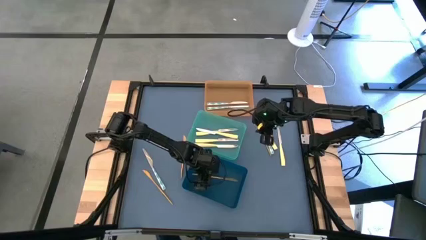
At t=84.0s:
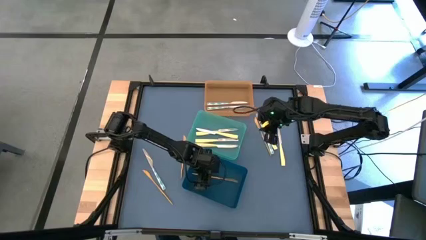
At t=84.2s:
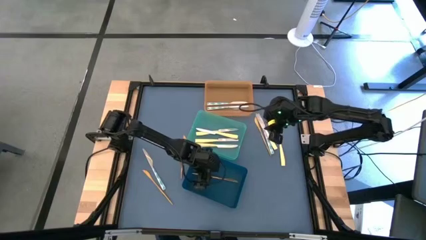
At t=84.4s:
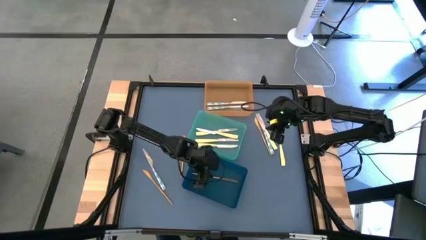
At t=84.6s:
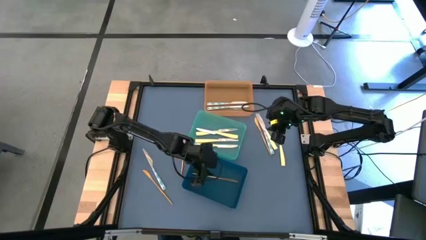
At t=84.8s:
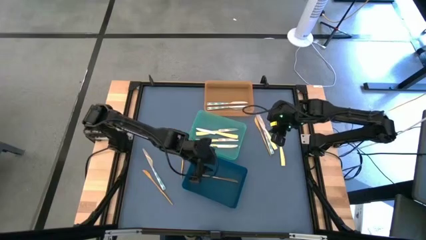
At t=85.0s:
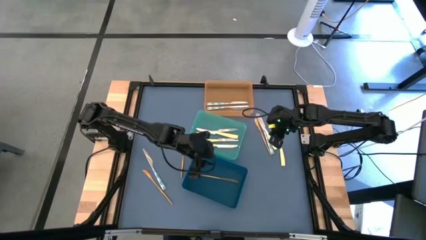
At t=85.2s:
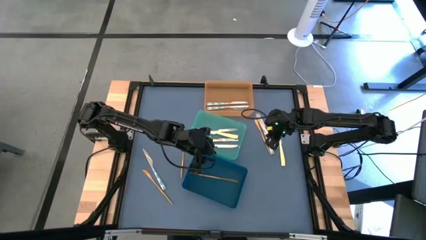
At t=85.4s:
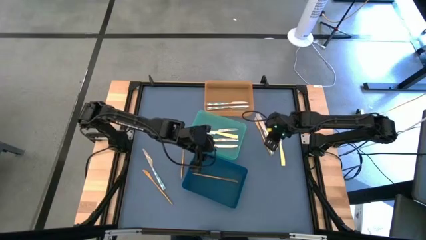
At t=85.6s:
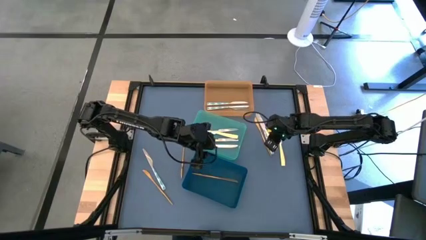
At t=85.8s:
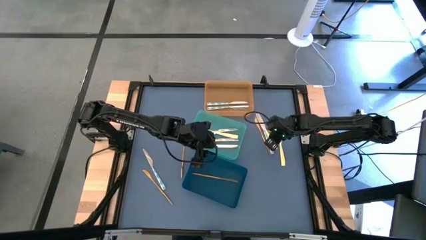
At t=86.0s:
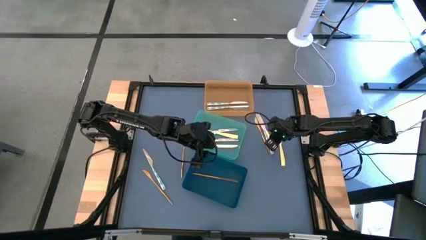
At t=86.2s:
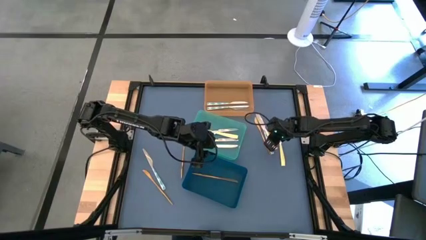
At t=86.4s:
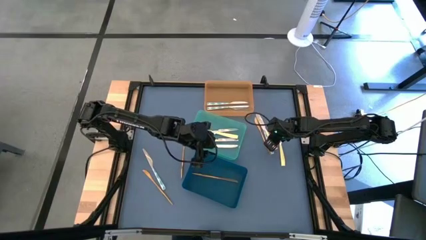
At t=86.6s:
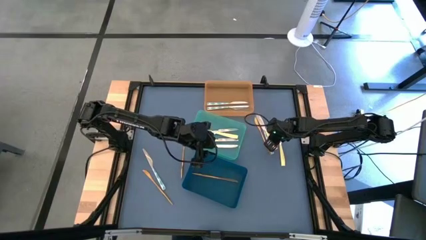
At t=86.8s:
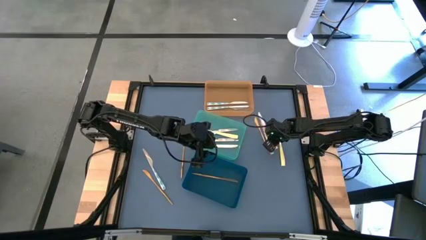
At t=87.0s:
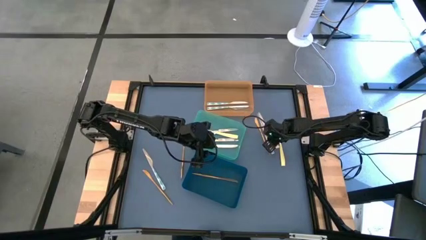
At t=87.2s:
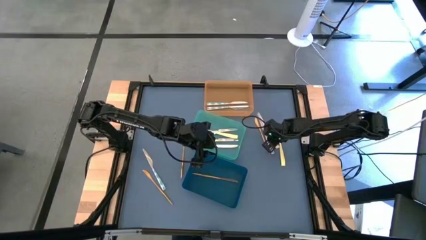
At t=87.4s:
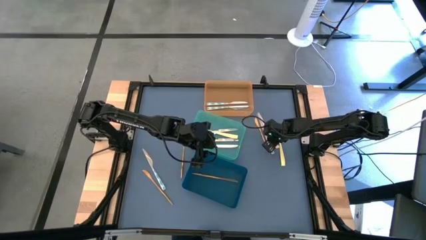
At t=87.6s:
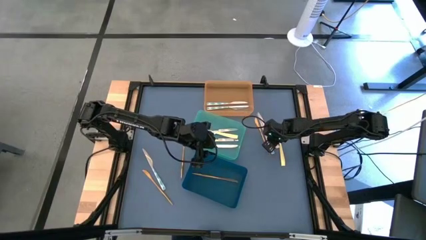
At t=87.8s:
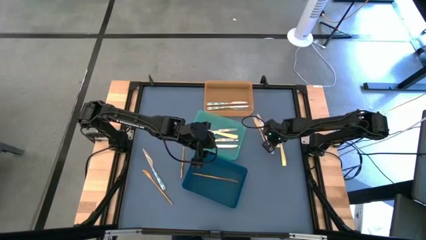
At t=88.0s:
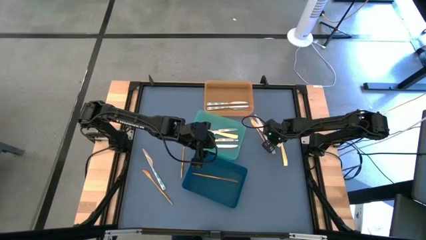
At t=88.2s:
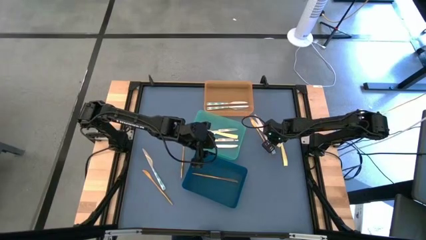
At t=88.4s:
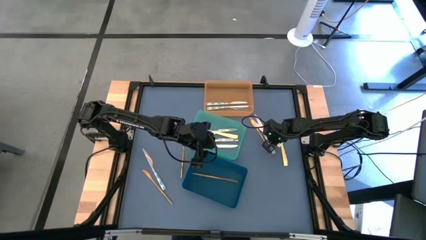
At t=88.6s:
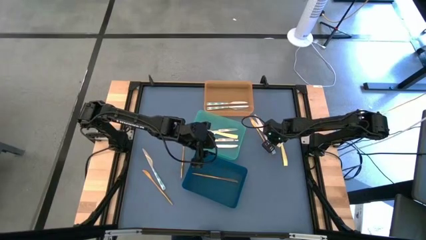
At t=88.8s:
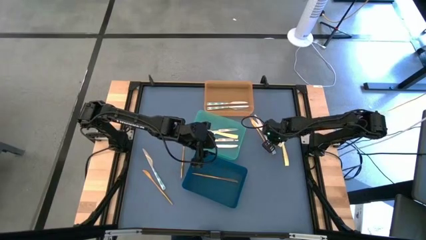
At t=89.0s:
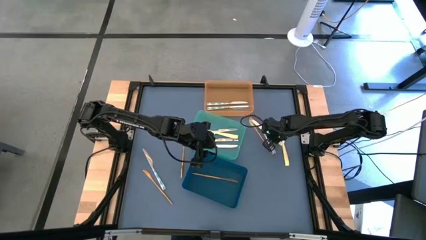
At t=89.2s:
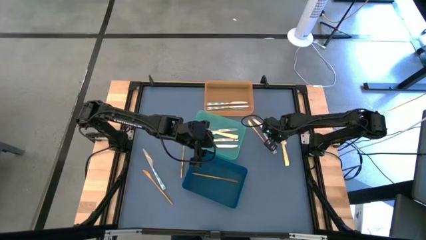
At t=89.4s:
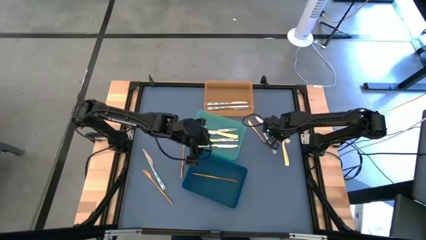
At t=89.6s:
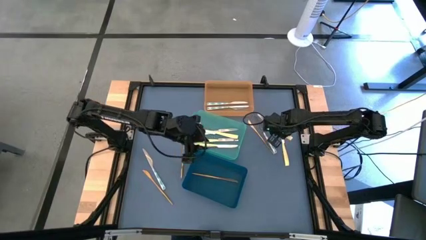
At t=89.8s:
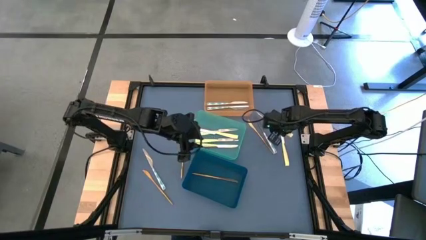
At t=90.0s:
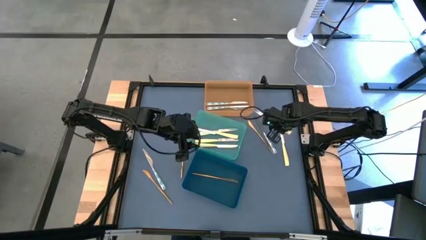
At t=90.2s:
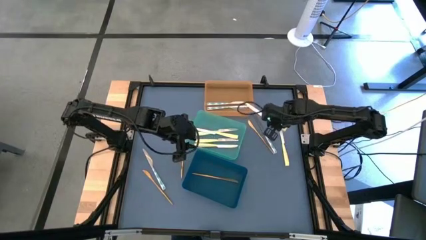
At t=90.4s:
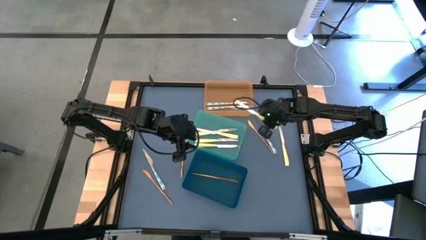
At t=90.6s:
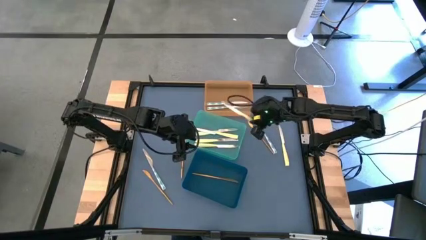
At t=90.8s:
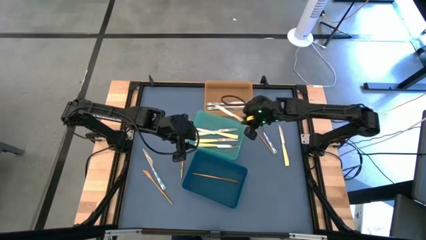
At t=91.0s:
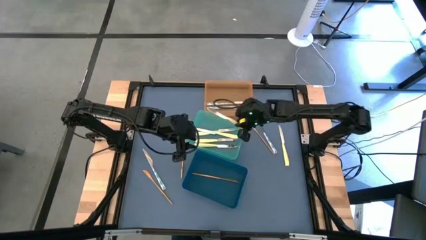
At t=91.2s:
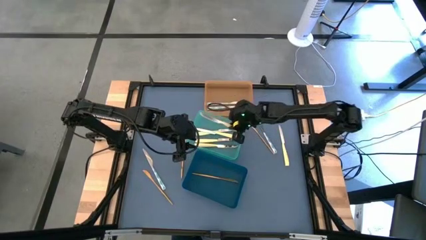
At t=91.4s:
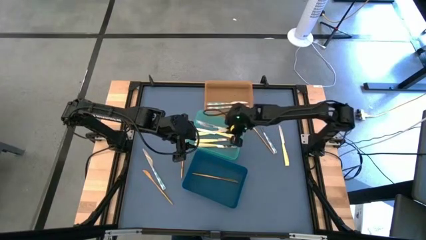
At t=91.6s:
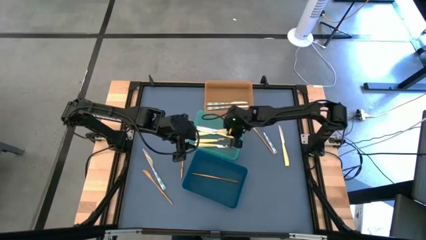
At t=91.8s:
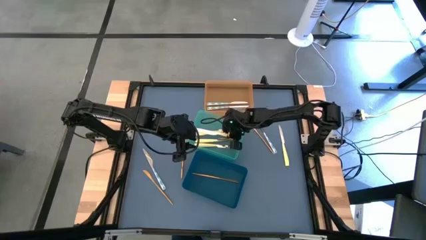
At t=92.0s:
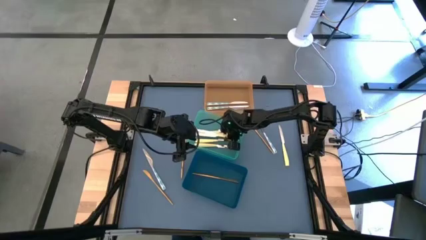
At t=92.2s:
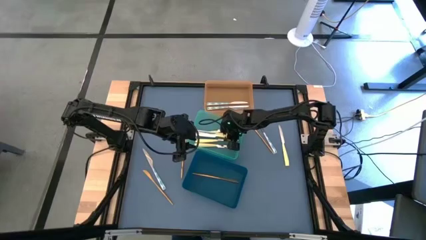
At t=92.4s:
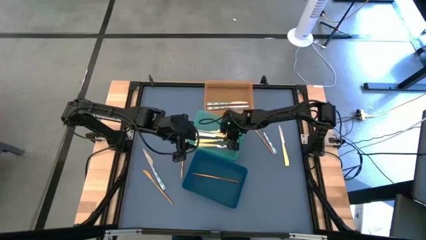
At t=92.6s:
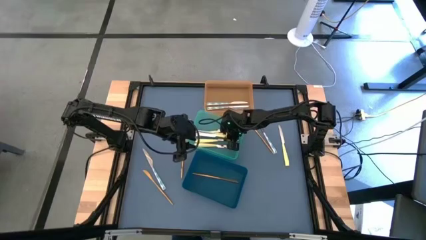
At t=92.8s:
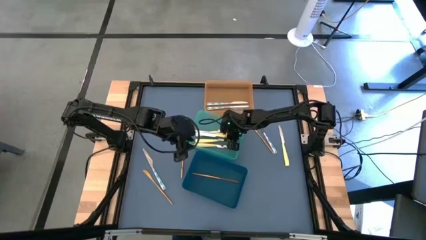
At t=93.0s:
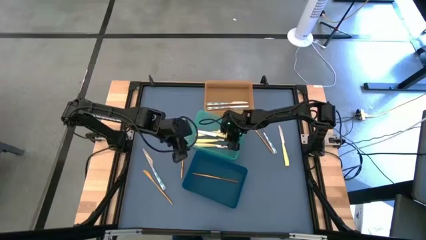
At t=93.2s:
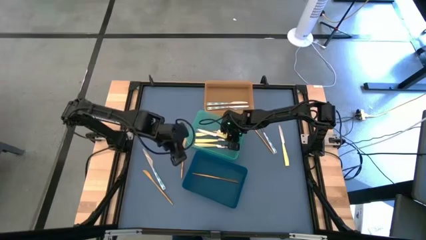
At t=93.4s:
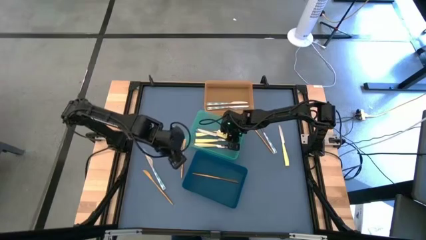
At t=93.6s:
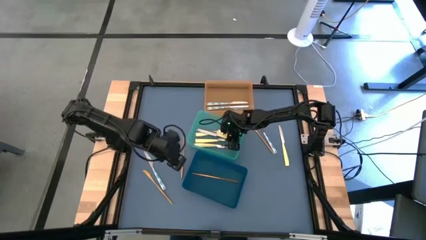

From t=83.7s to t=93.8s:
Task: Sort silverware by color (type)
Put the yellow knife into the green bin

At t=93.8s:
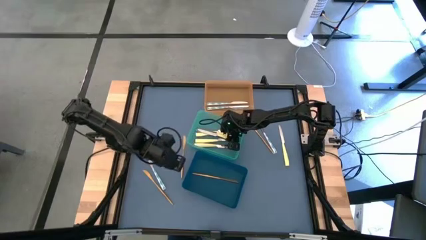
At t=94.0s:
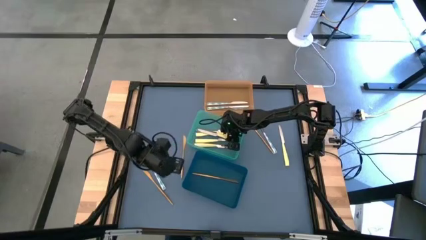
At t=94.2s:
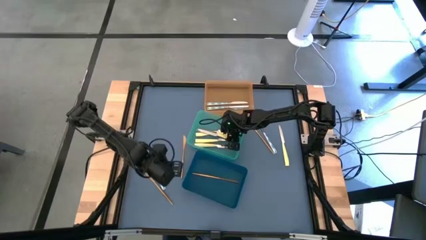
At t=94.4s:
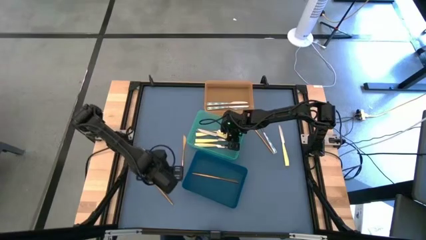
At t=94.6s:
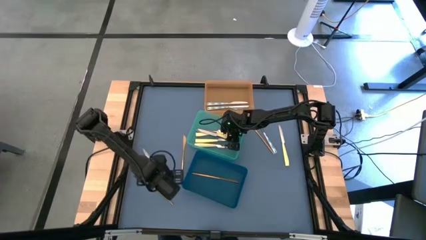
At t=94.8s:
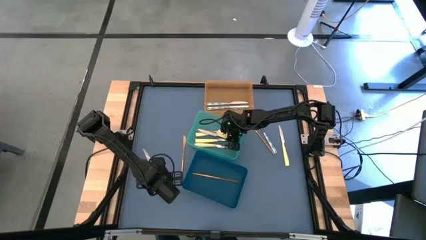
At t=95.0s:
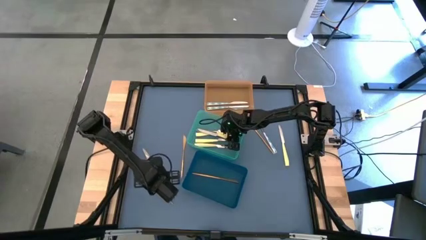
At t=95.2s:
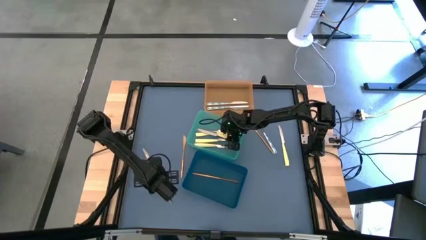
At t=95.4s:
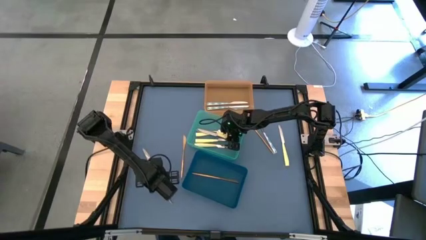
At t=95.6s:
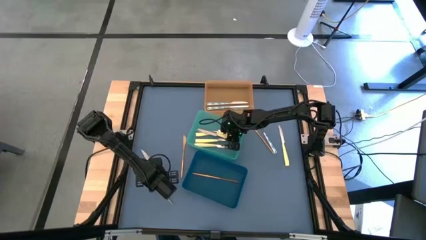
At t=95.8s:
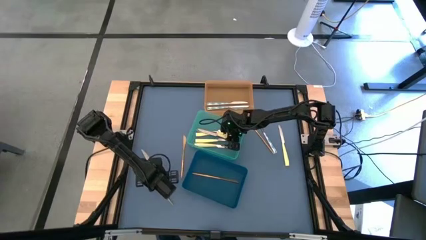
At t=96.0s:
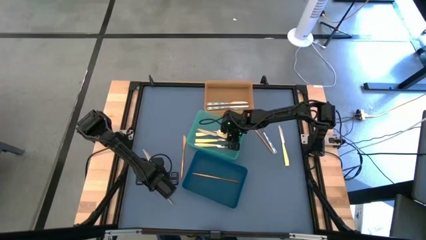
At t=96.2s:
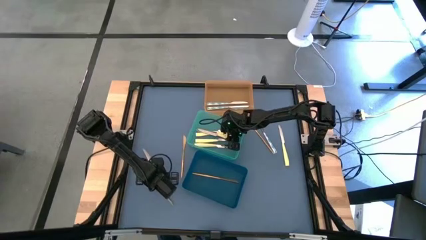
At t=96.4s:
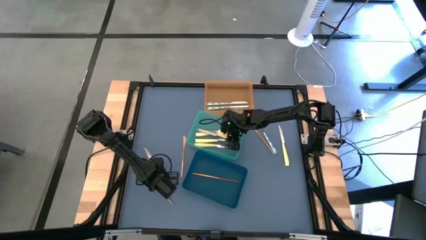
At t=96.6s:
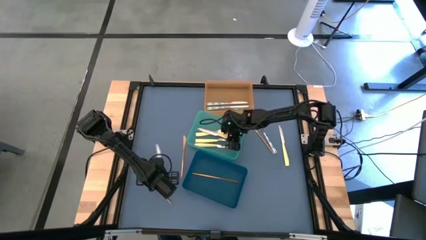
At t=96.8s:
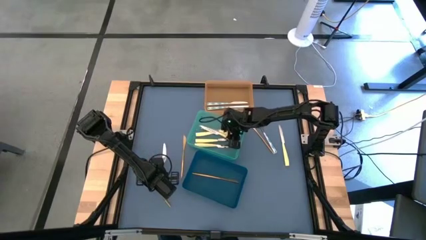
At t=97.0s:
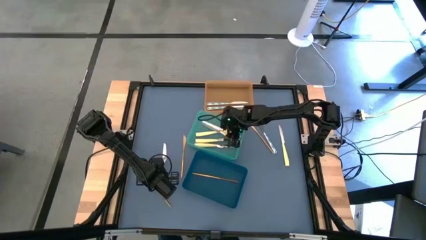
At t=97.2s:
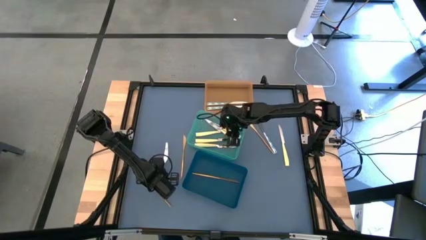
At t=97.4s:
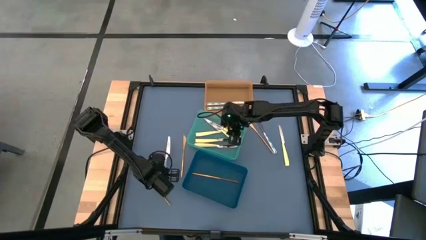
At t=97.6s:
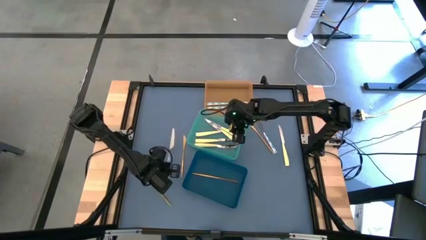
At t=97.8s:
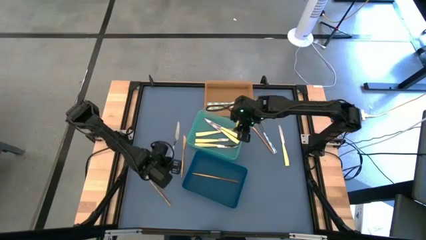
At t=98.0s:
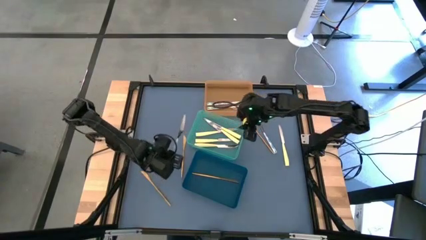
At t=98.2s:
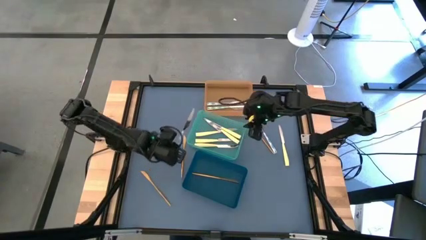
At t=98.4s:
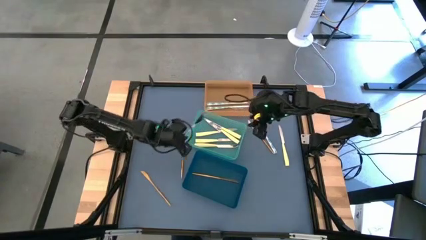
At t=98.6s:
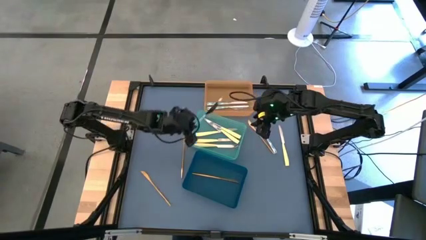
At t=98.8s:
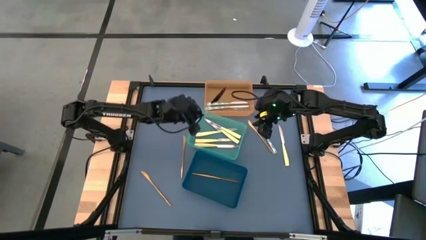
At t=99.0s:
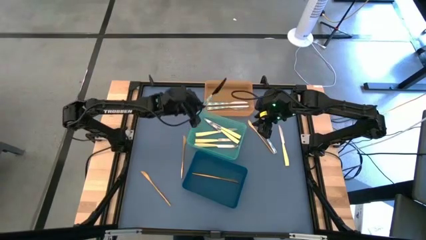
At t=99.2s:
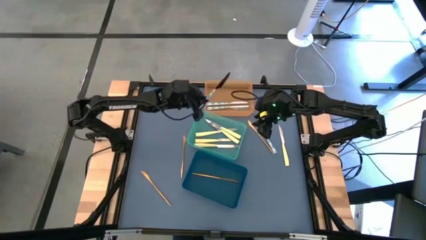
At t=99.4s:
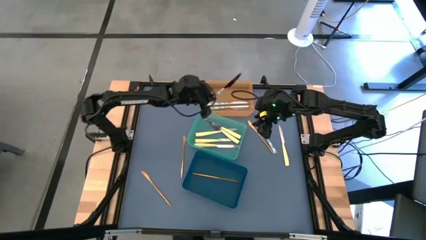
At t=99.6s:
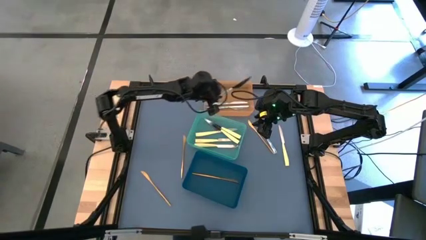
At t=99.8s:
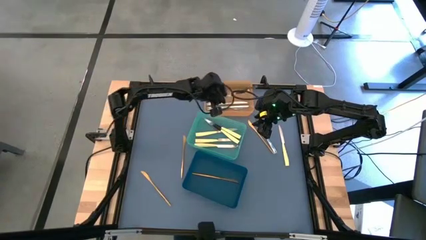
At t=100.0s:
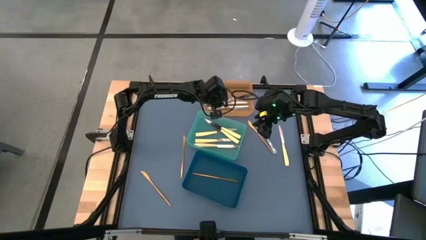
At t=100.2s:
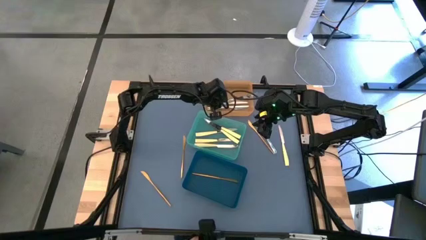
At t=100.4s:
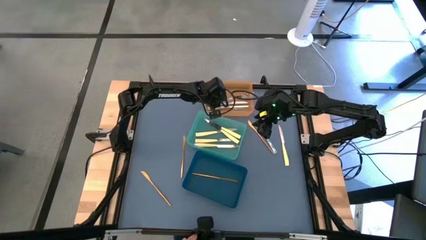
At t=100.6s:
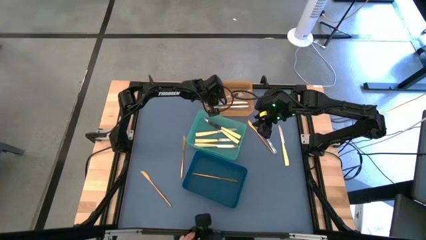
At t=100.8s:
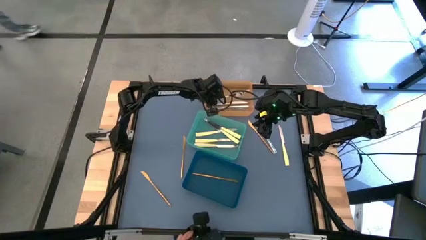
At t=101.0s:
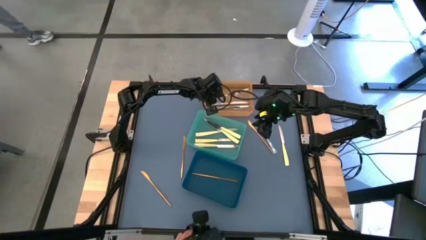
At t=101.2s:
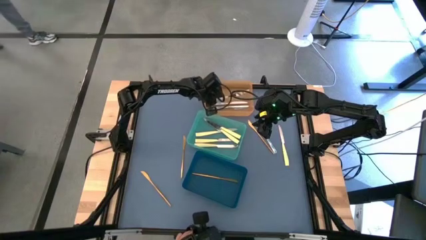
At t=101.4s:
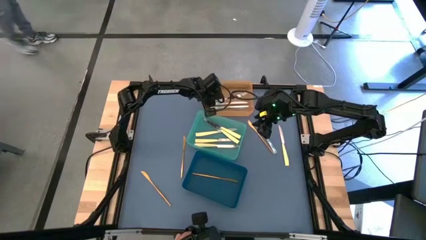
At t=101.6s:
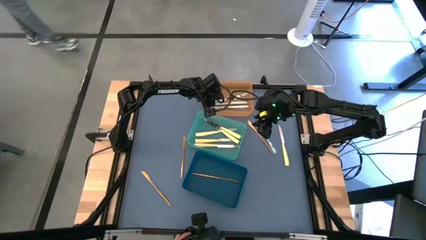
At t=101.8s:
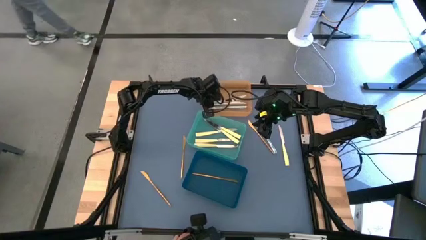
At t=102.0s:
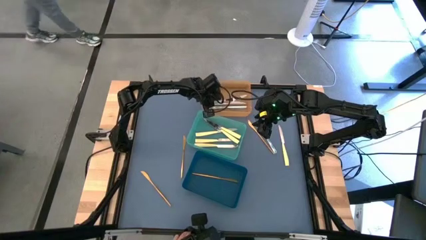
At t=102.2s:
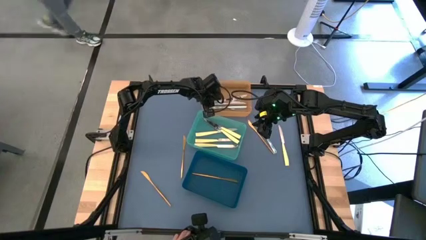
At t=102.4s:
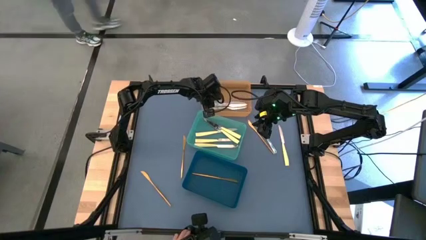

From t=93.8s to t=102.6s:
Put the white and blue knife into the orange bin
